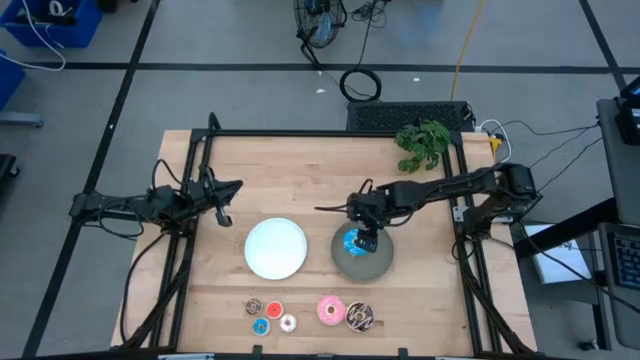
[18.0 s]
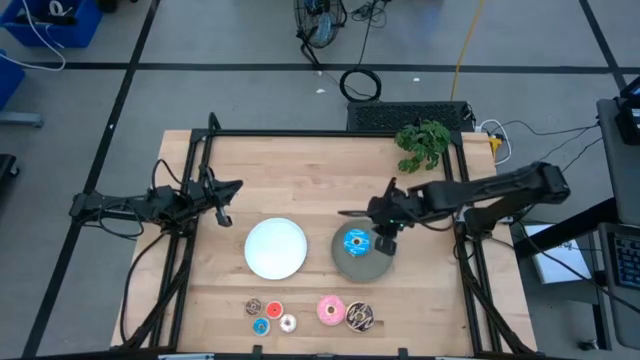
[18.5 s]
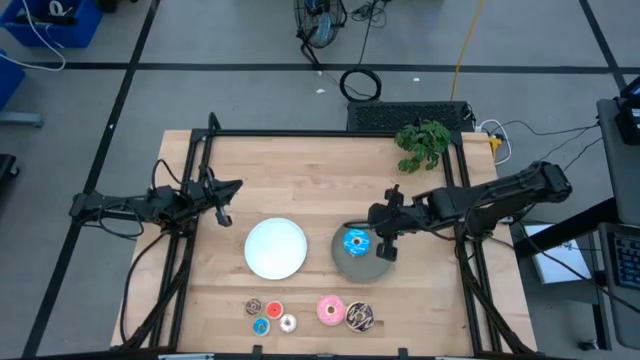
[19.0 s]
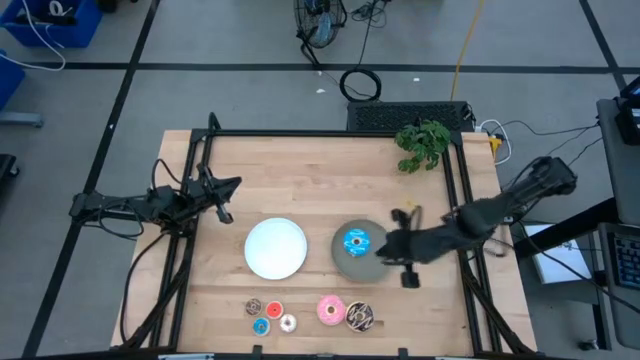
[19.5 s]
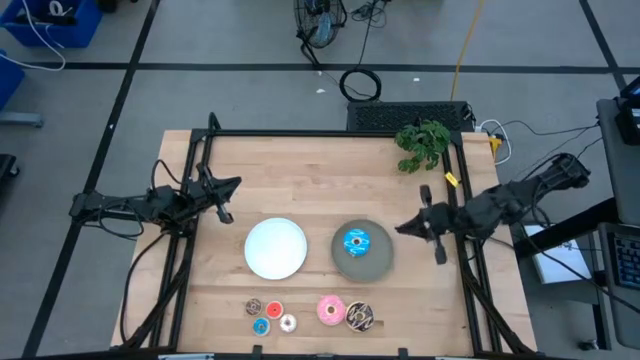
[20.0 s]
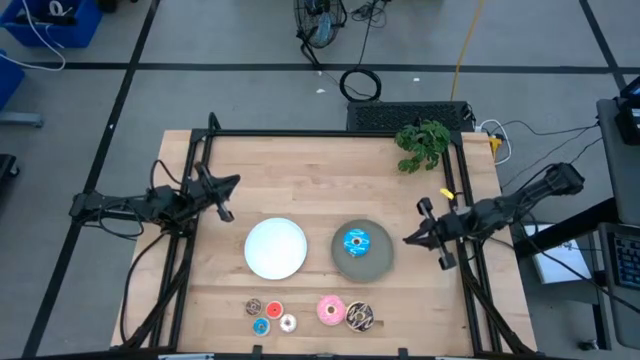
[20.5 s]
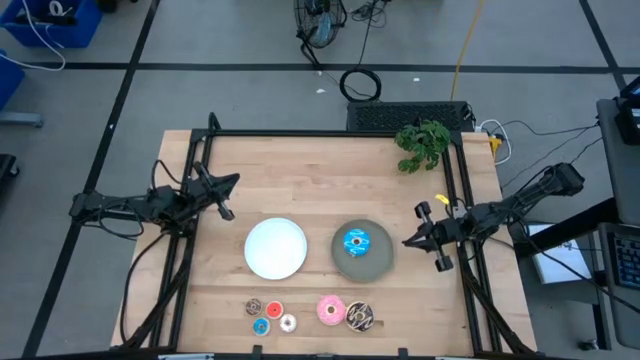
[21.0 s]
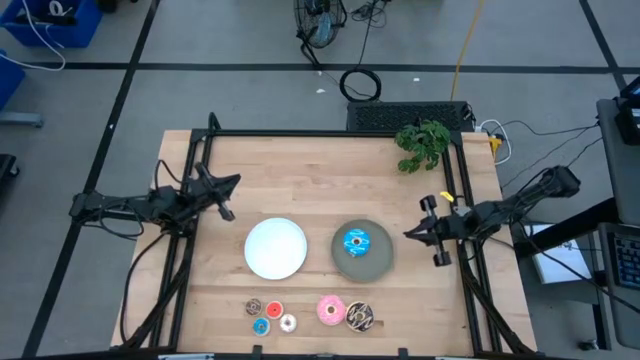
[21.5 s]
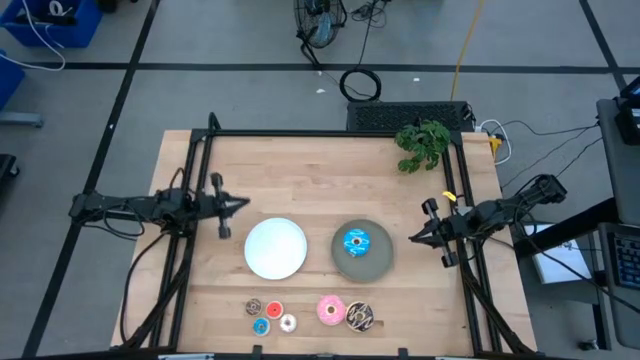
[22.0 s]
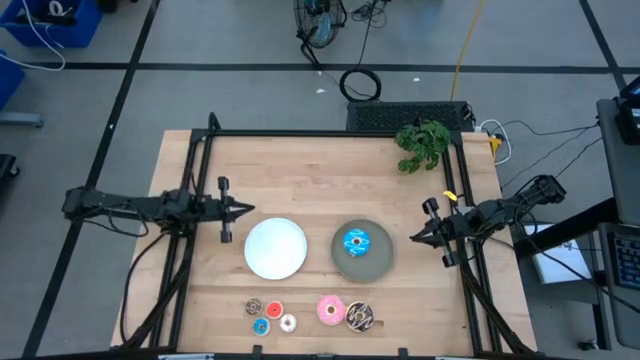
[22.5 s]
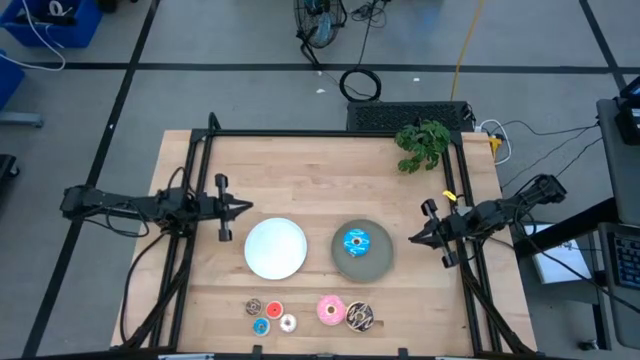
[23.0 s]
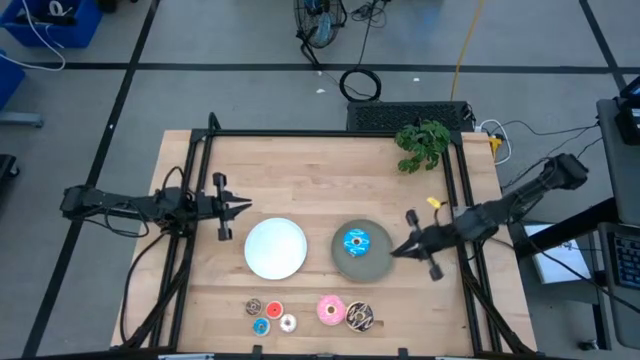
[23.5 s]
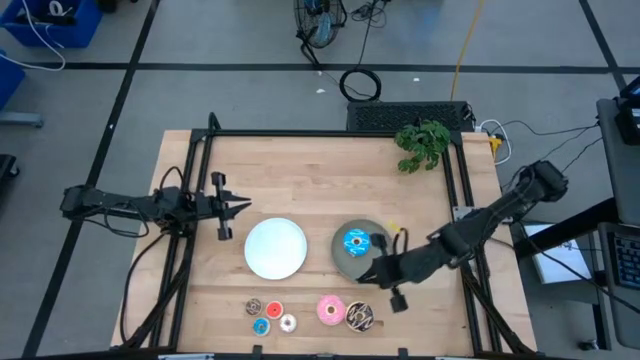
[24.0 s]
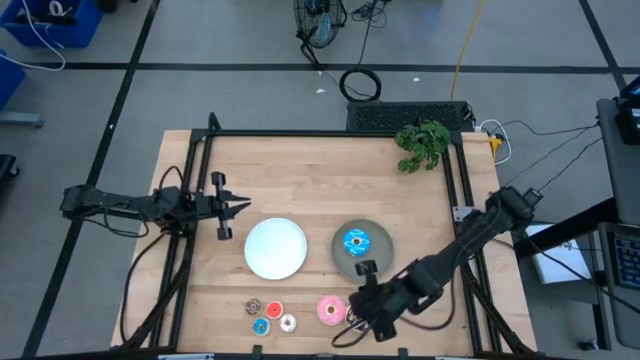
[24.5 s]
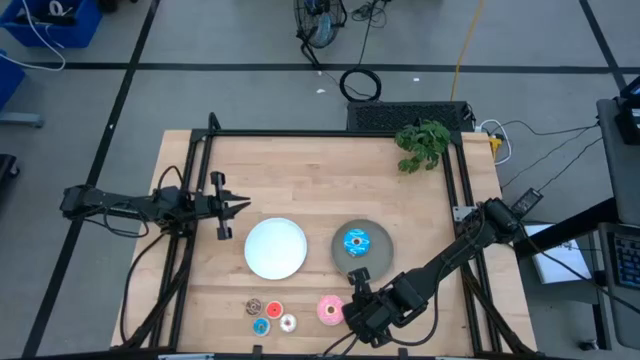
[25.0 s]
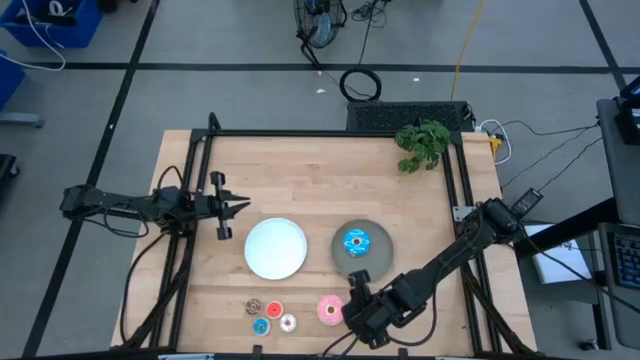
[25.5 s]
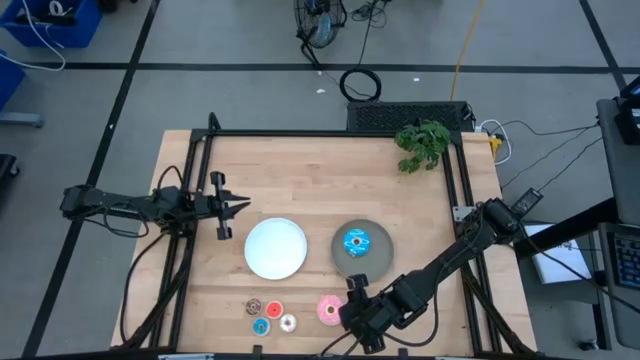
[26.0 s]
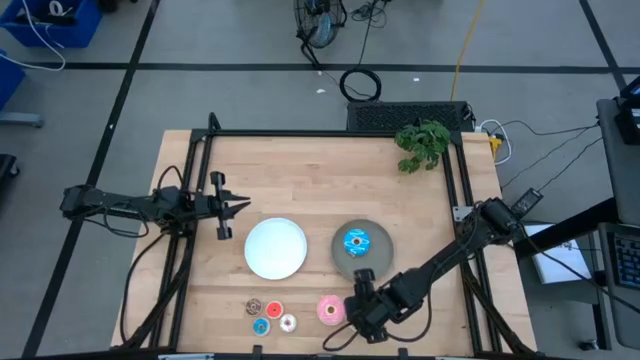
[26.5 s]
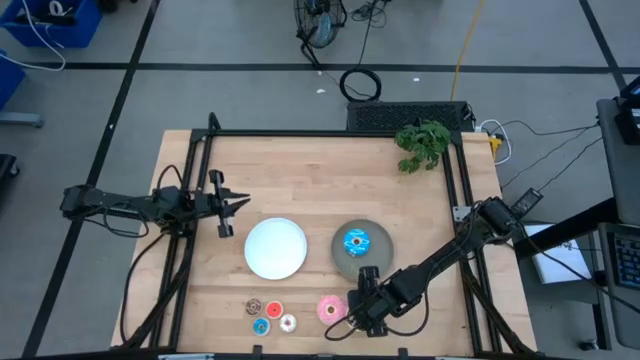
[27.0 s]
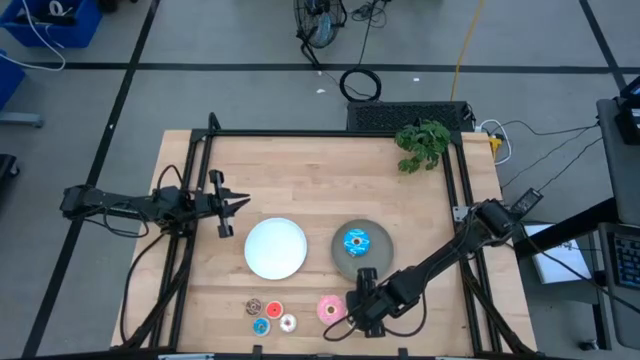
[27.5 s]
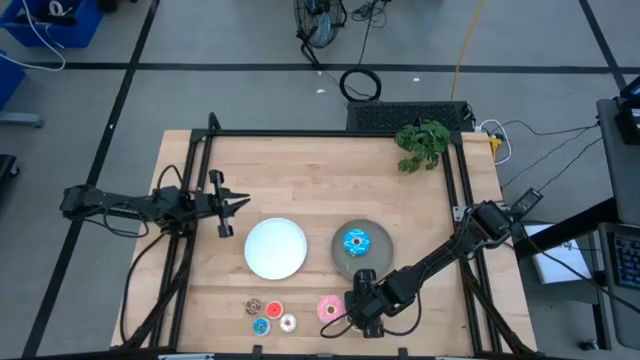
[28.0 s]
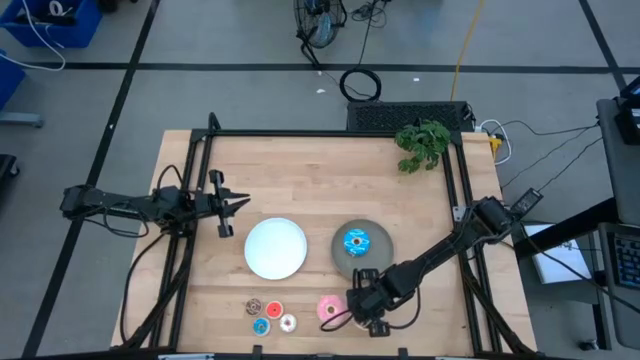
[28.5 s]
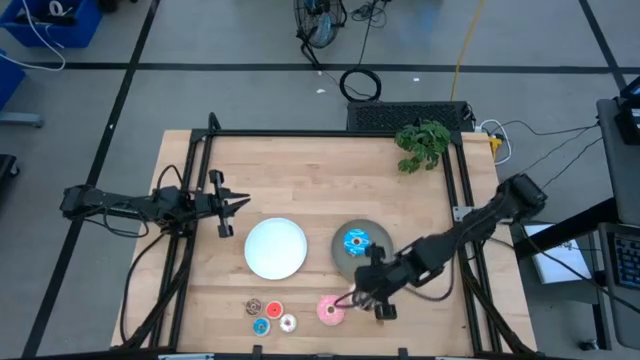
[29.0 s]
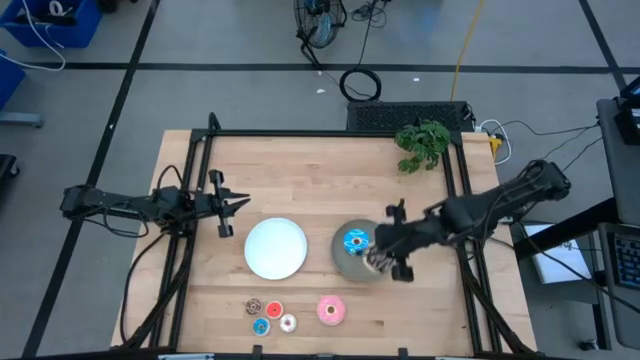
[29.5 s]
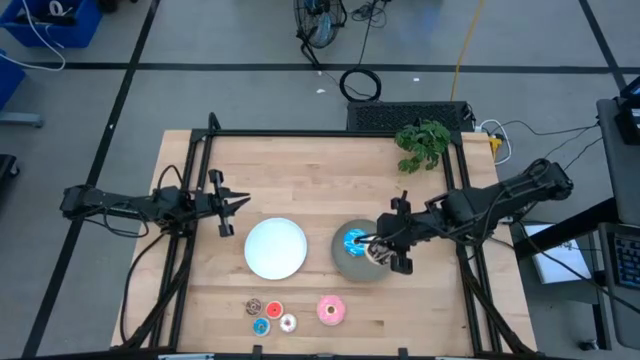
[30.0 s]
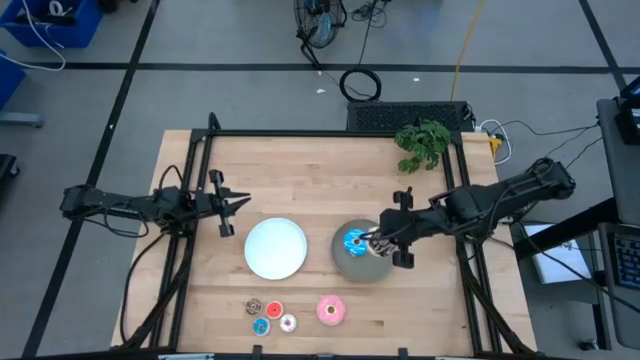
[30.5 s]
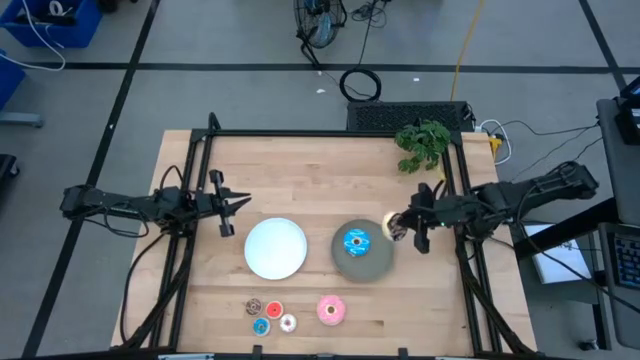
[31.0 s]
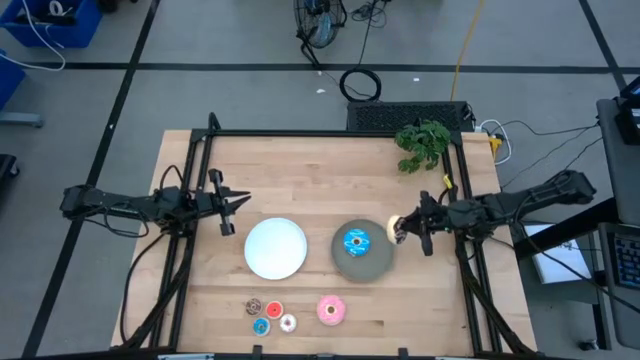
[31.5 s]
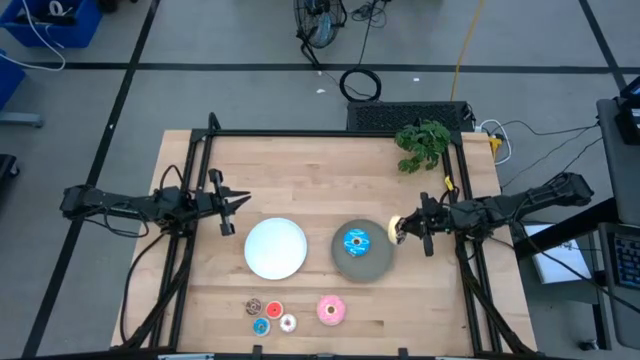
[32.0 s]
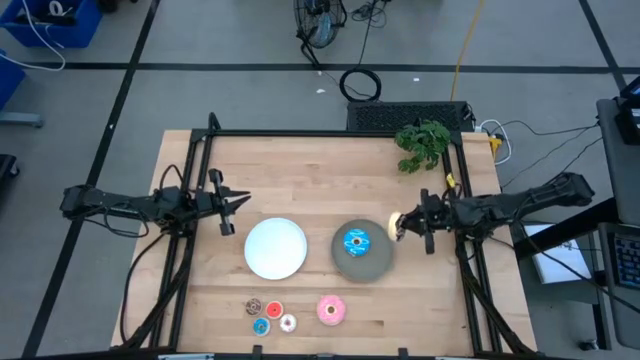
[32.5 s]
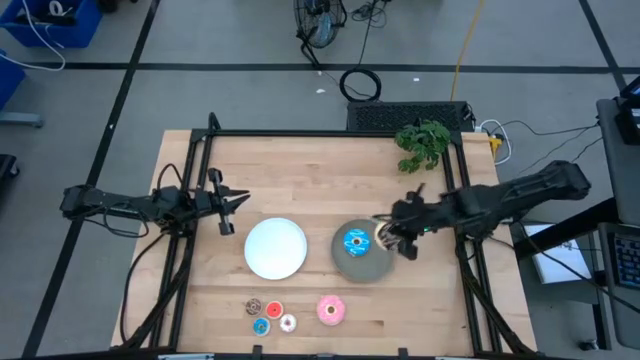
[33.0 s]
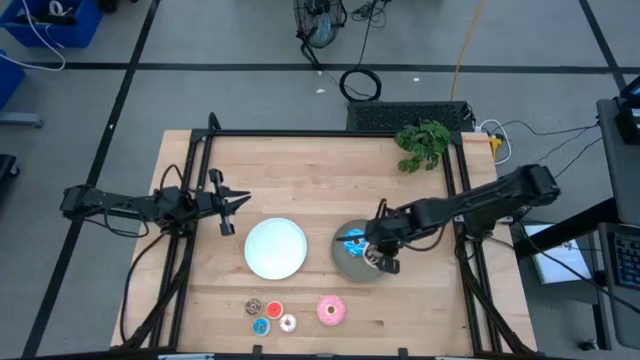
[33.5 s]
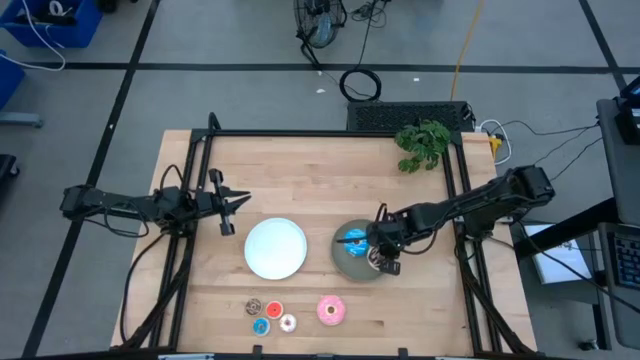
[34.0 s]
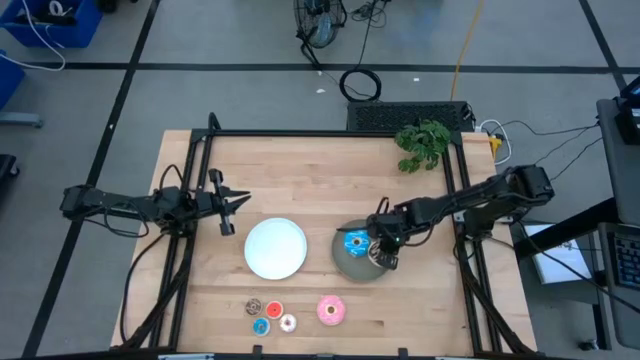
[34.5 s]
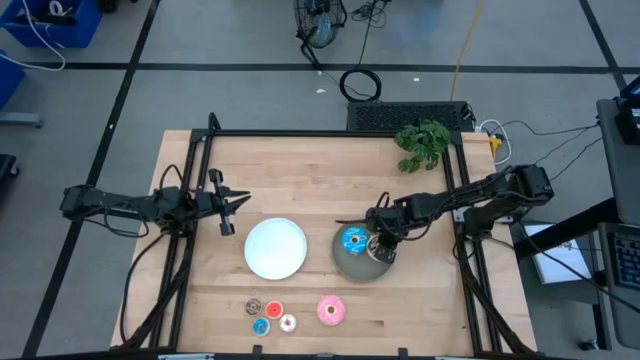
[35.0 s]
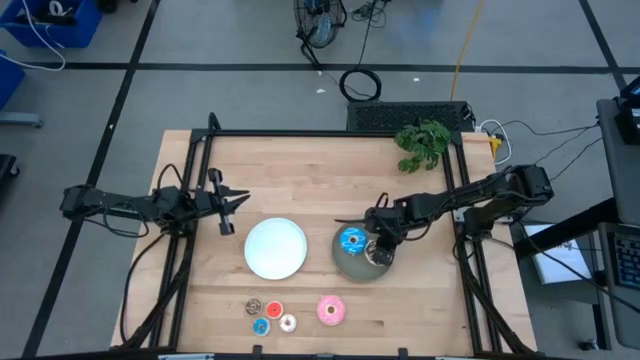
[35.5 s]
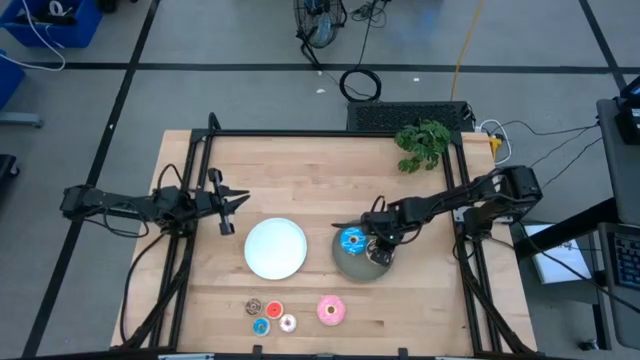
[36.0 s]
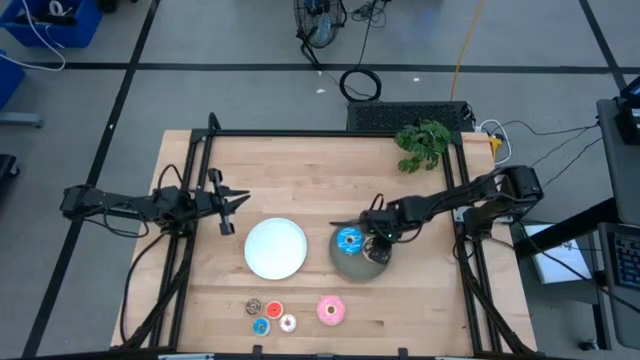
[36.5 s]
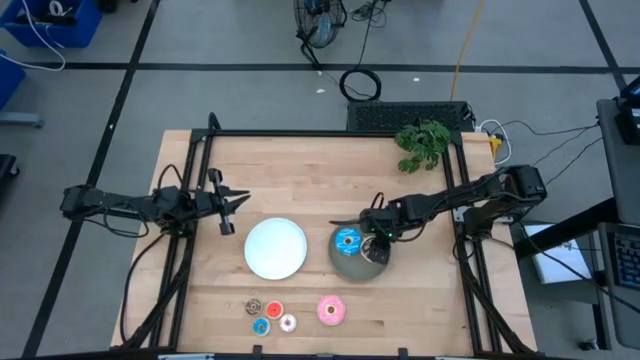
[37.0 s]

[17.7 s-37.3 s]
Task: Pick & Place donuts
Put the big black donut into the gray plate
